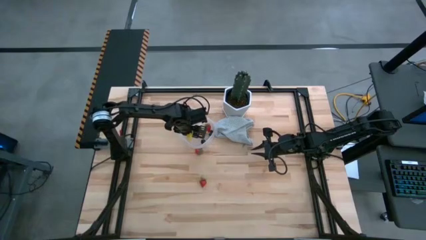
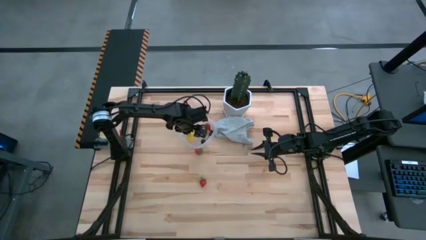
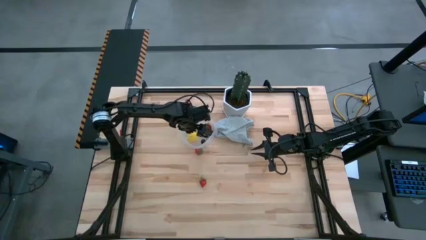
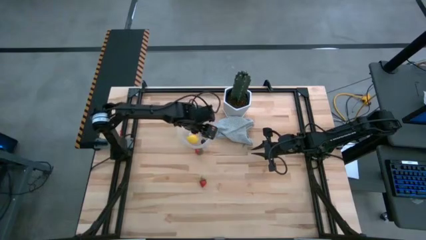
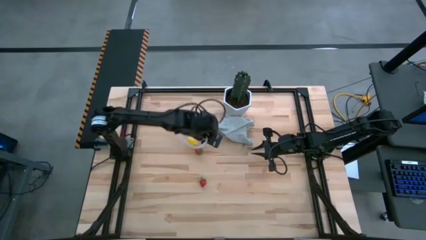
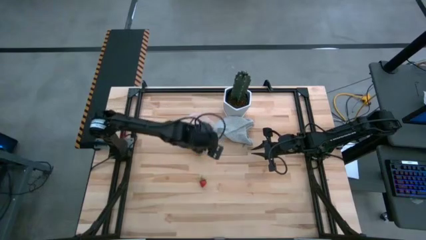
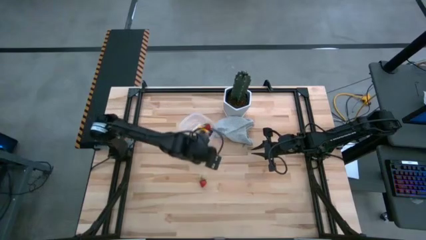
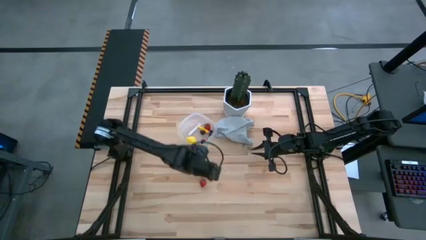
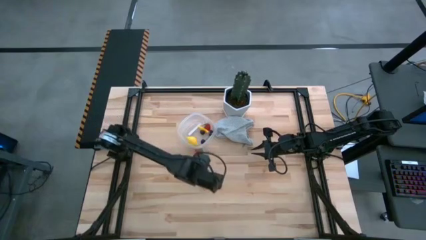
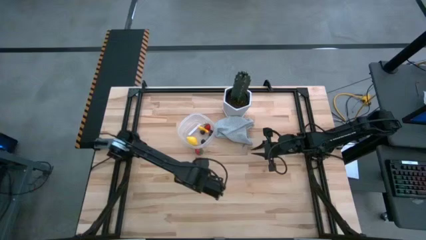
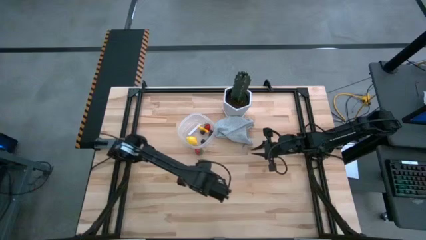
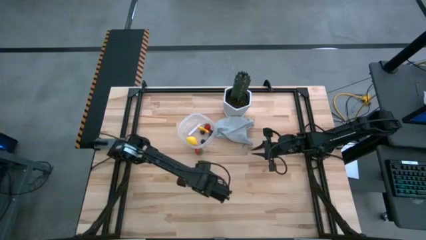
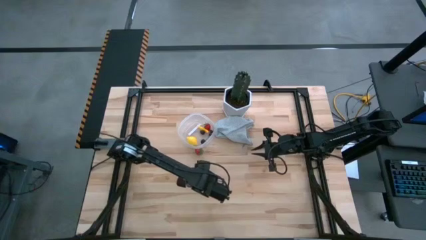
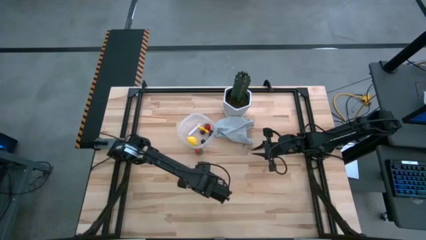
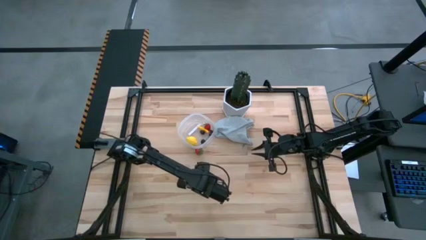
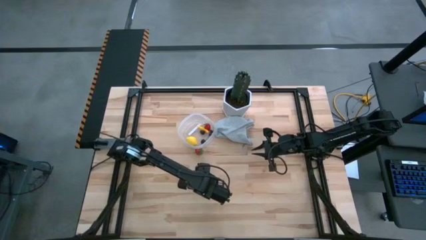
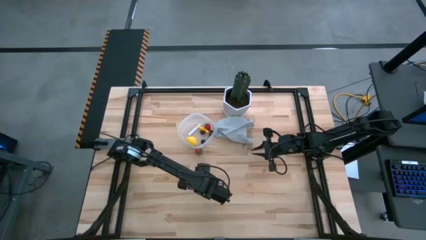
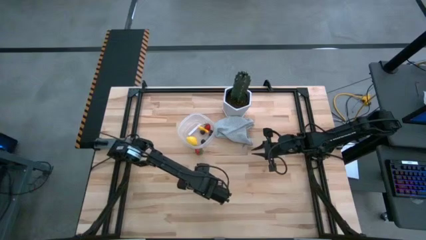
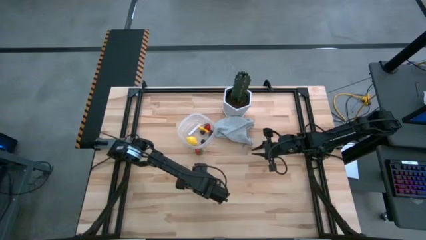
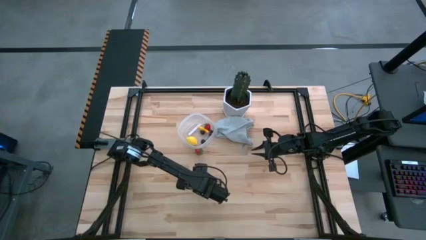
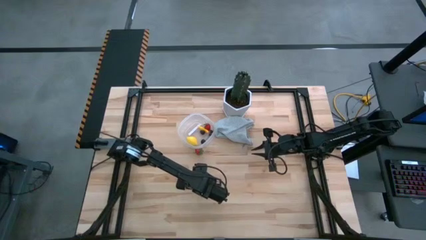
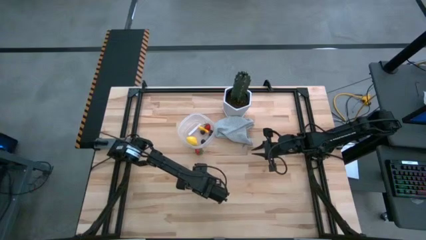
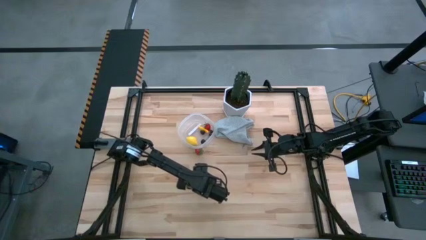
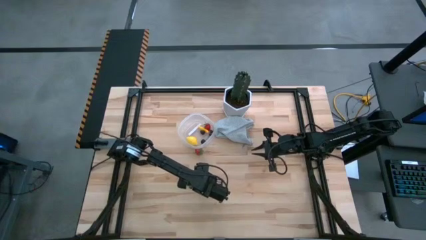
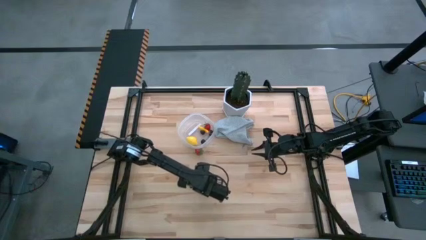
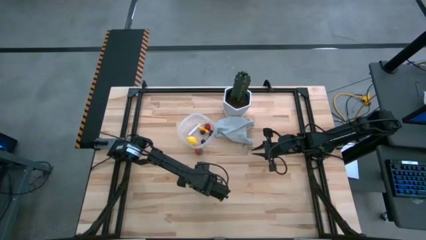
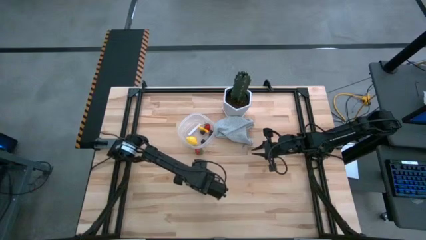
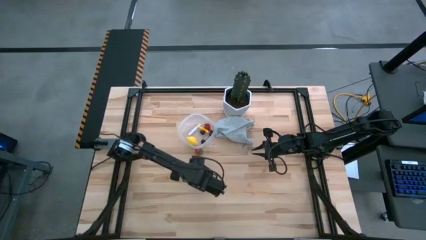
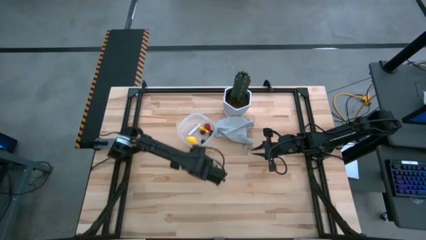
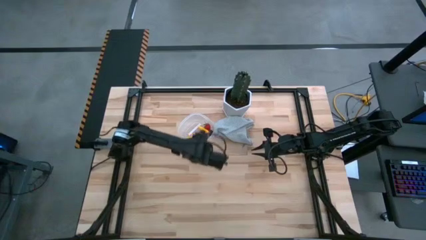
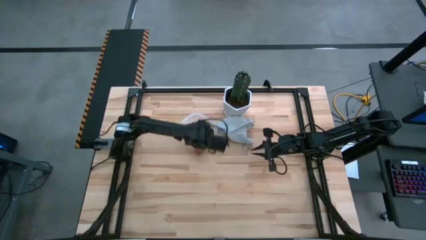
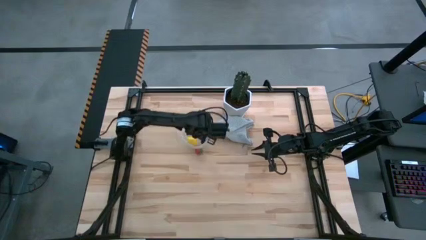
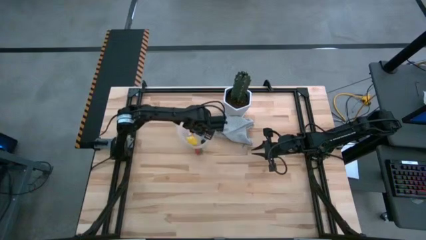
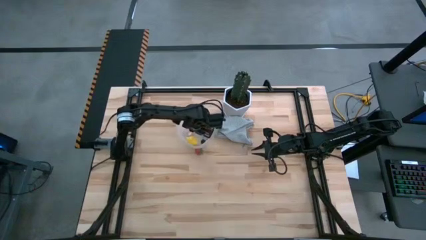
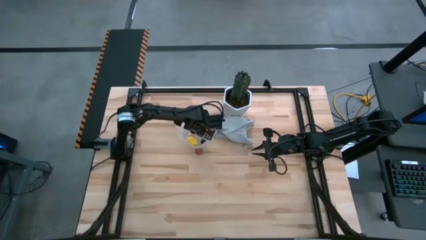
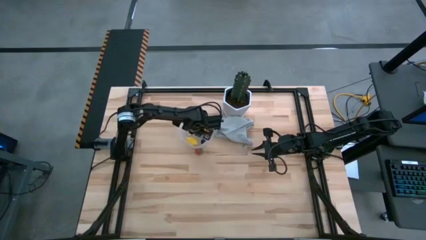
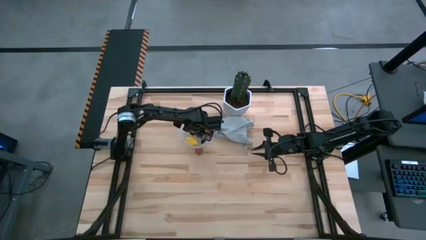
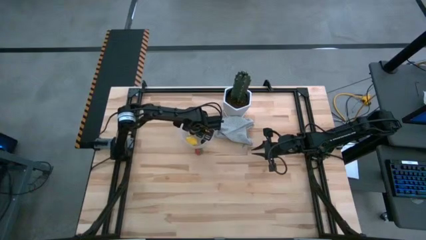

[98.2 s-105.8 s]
Task: Pick and placing Produce into tupperware
Put the bottom strawberry into the transparent bin

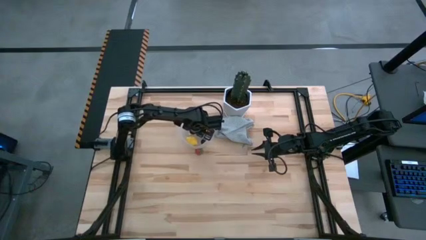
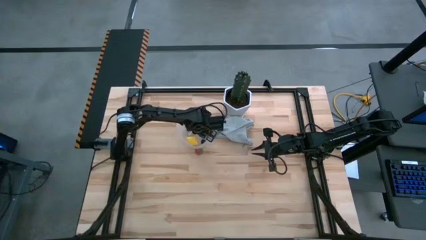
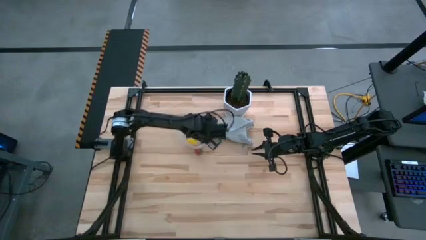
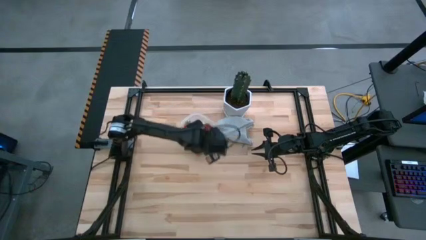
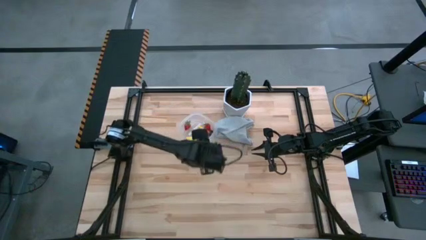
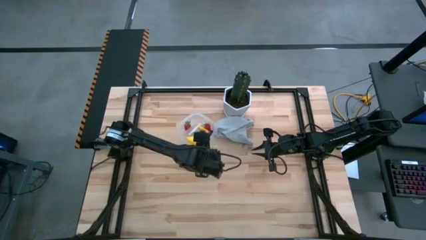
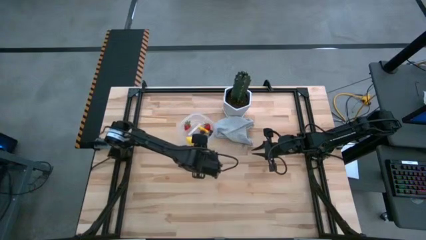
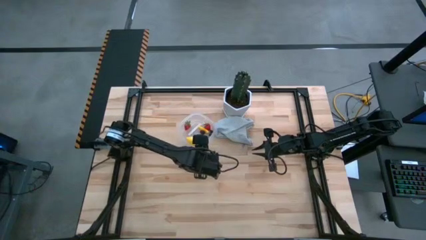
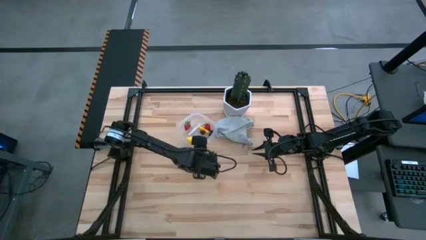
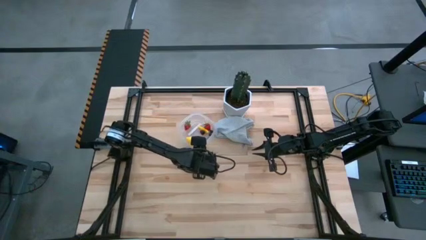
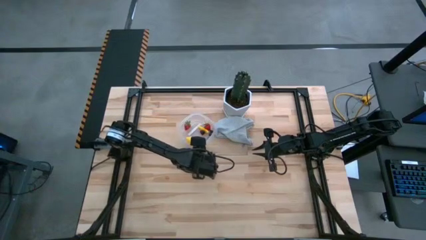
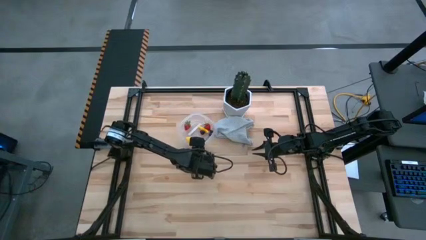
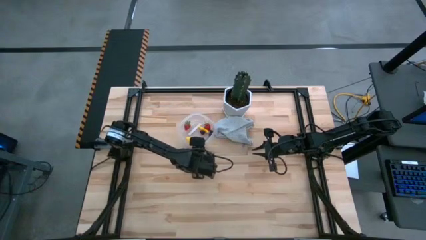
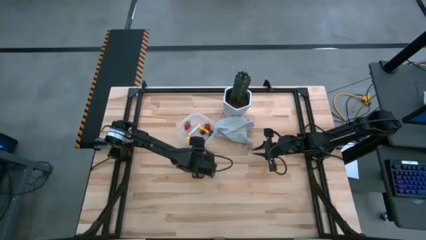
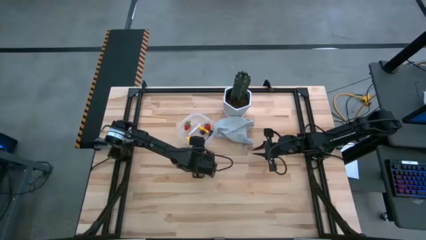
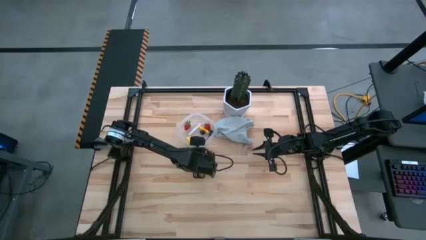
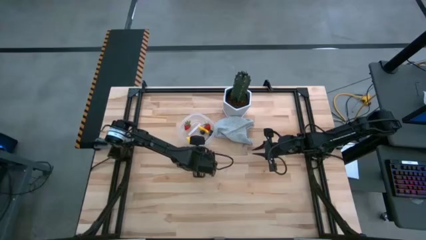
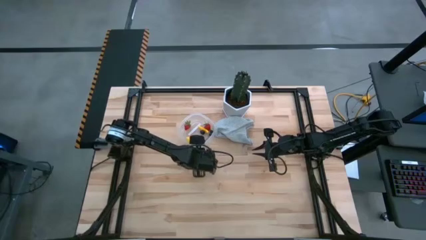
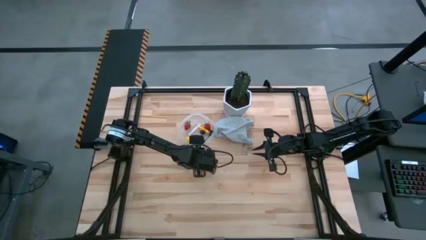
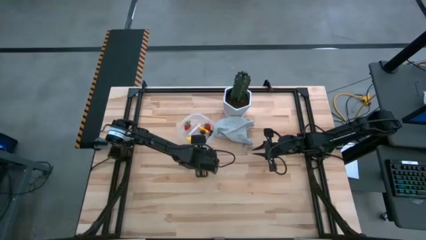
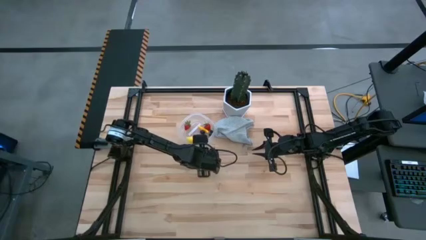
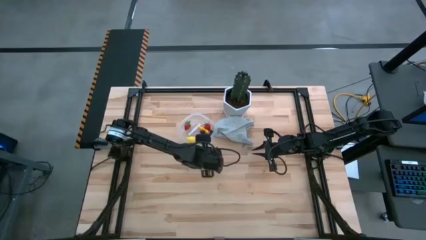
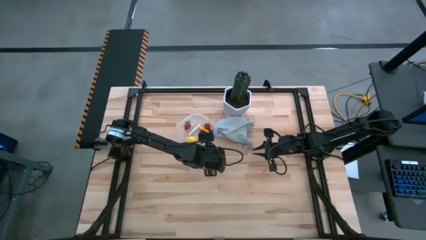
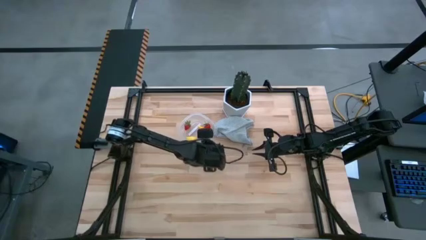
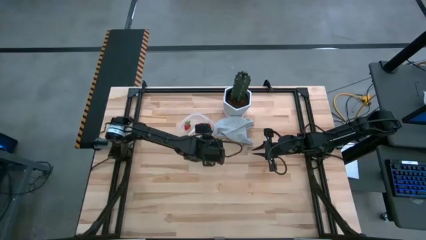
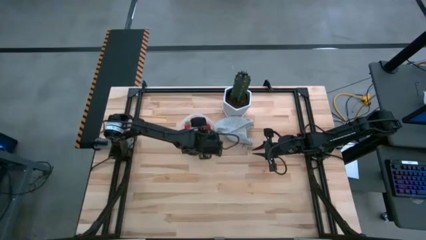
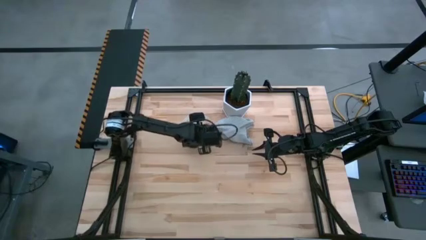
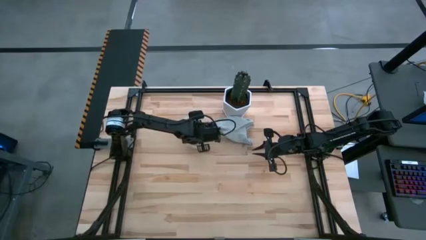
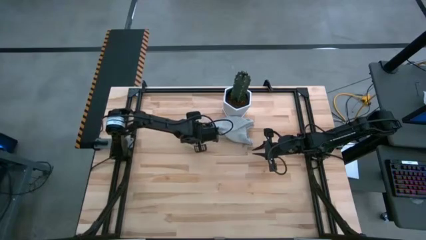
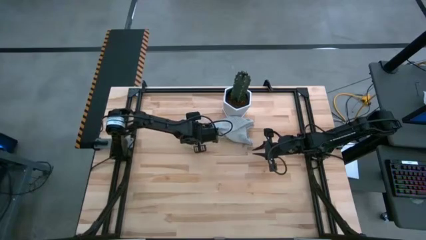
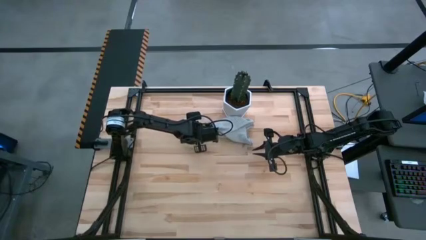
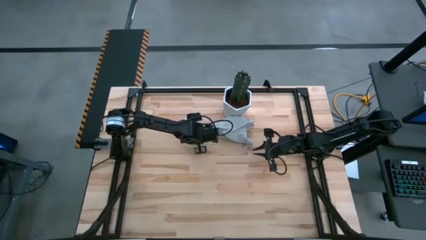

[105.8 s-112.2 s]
Put the strawberry into the transparent bin

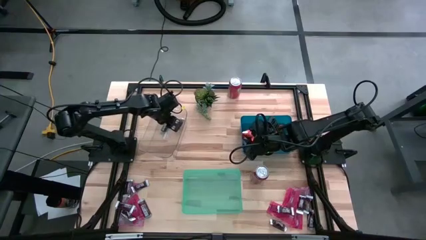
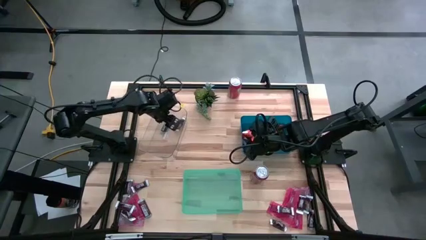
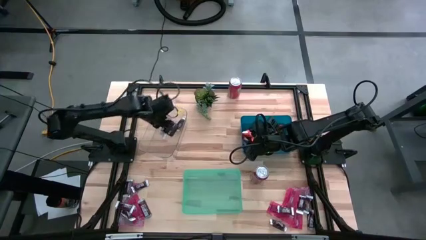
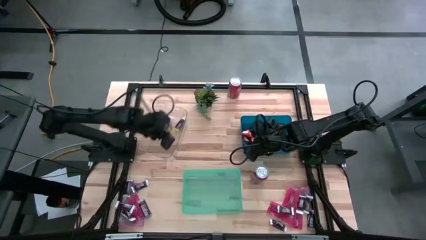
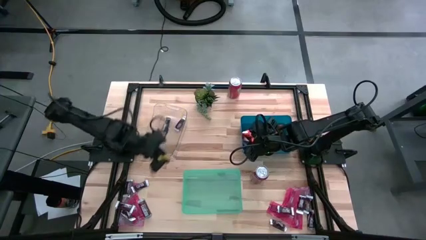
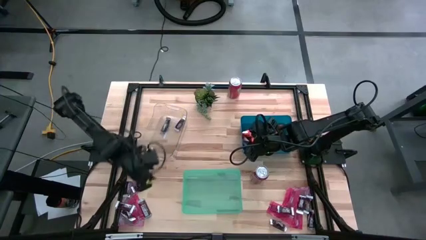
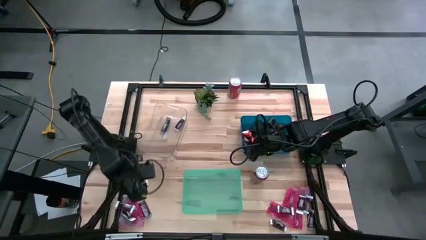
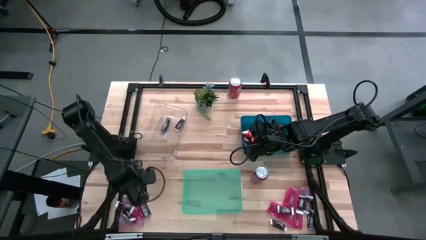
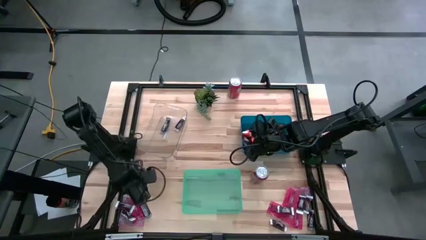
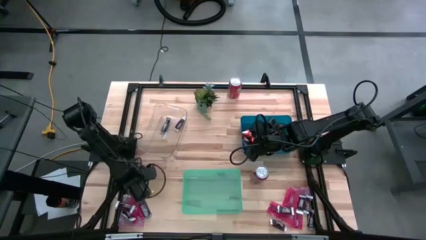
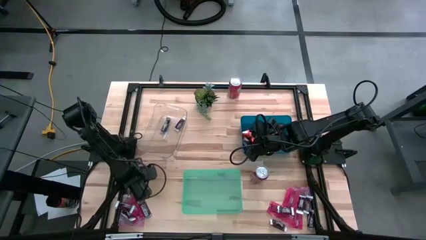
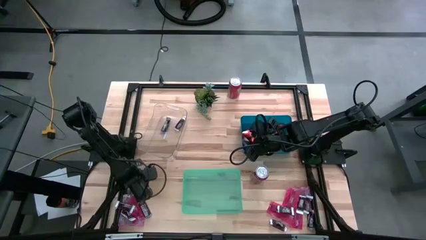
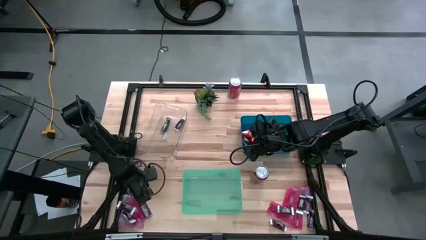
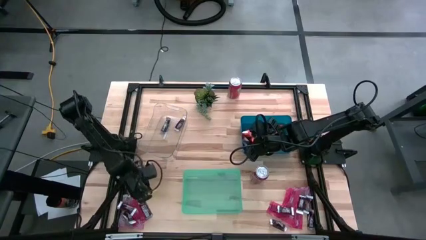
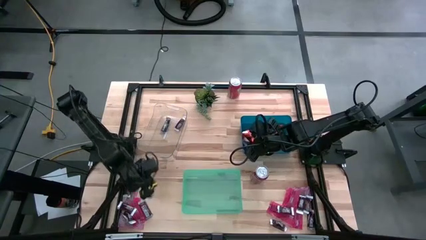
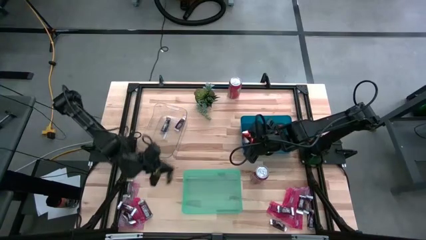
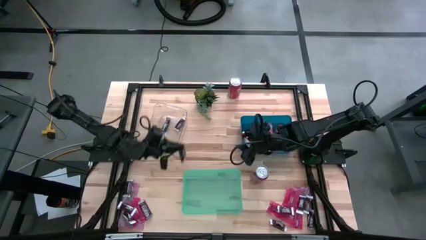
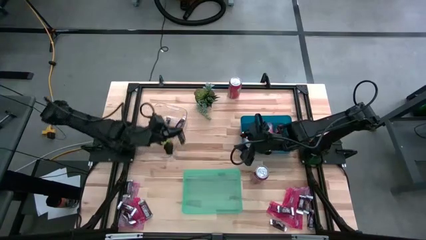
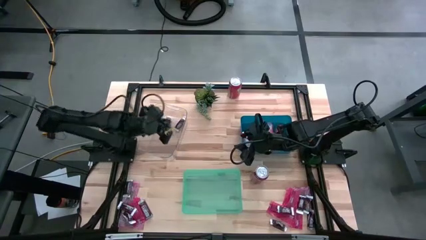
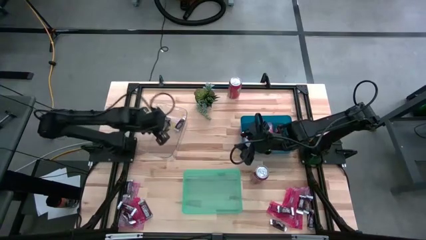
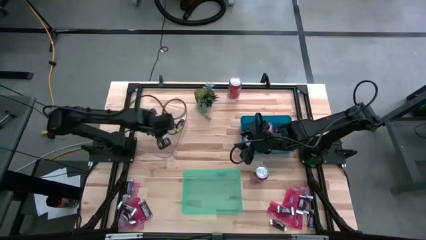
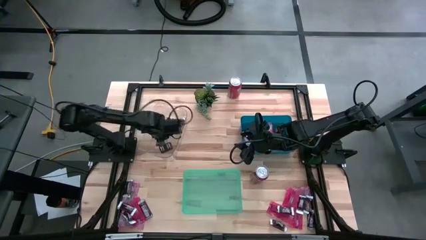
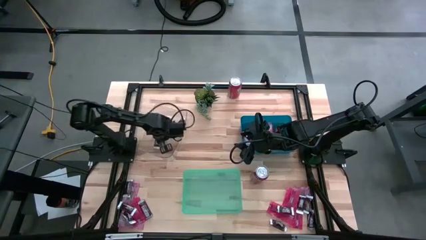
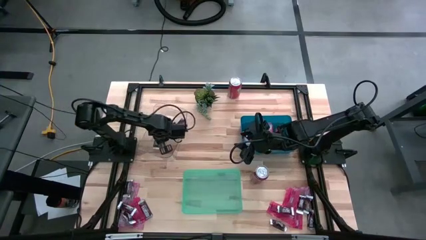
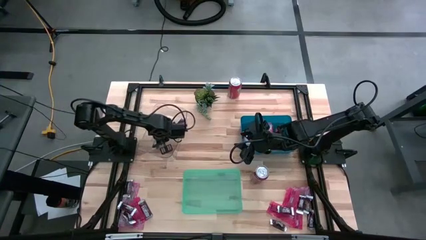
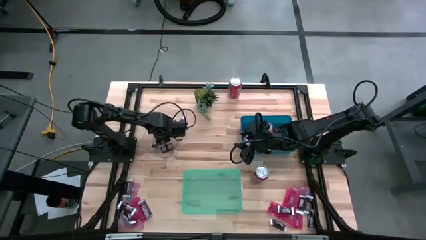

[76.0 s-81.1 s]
Task: Sort candy
Put the brown chocolate bar into the transparent bin
